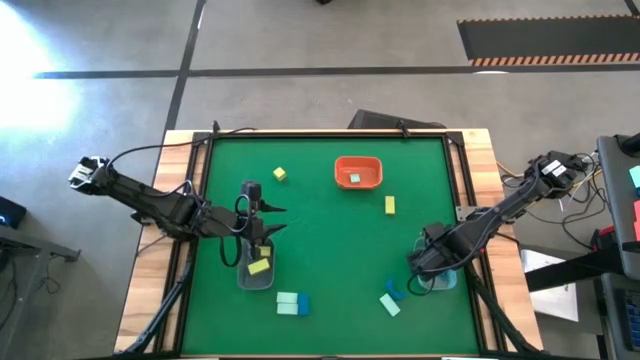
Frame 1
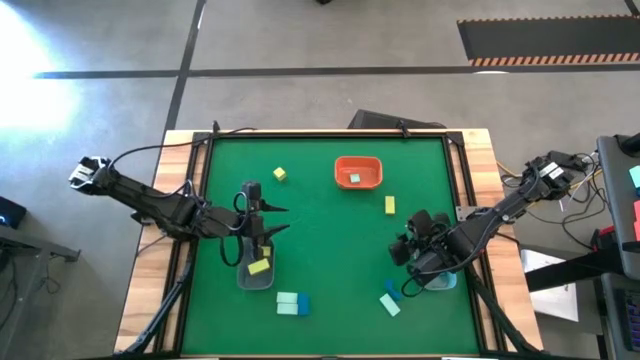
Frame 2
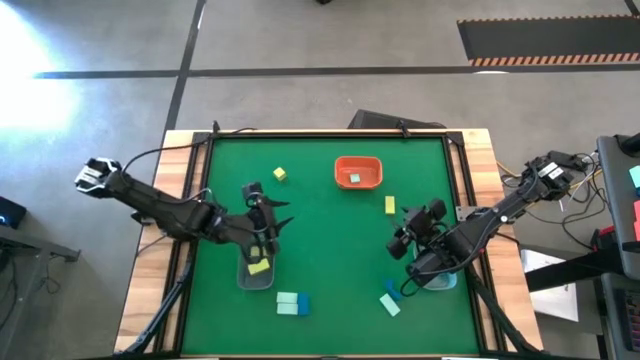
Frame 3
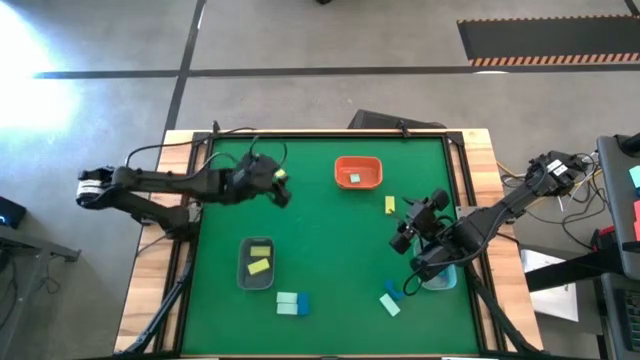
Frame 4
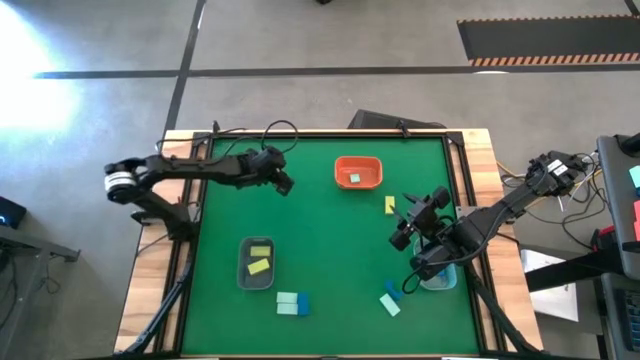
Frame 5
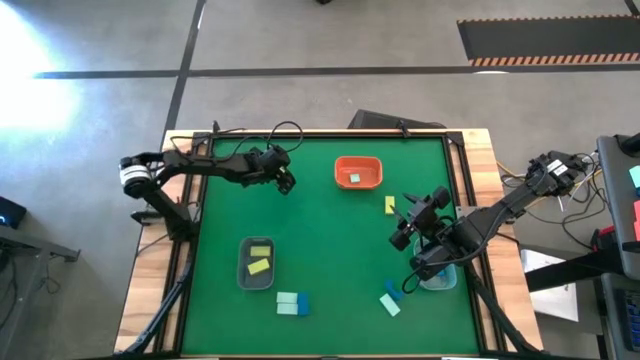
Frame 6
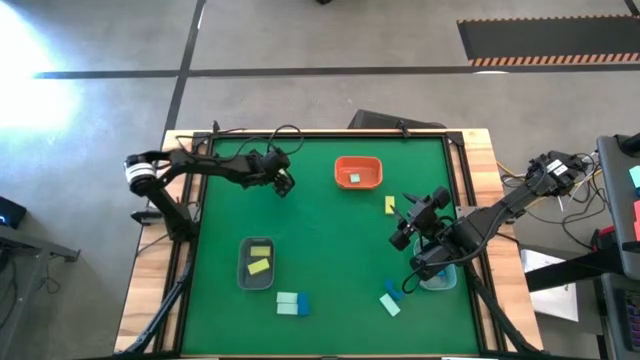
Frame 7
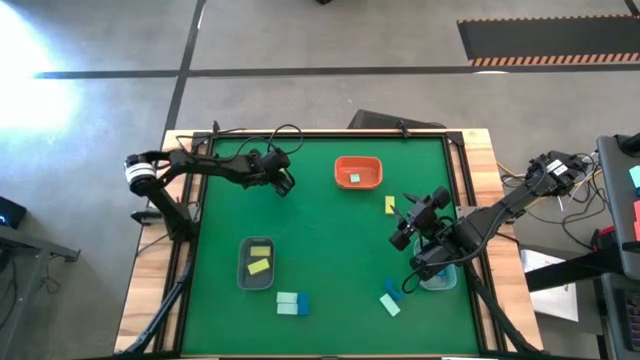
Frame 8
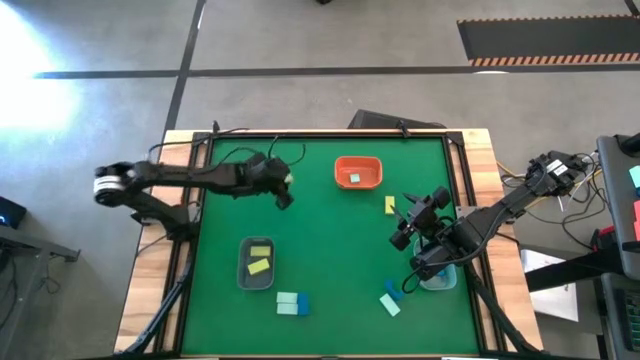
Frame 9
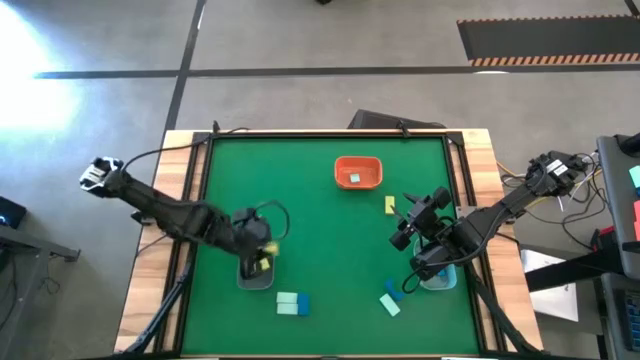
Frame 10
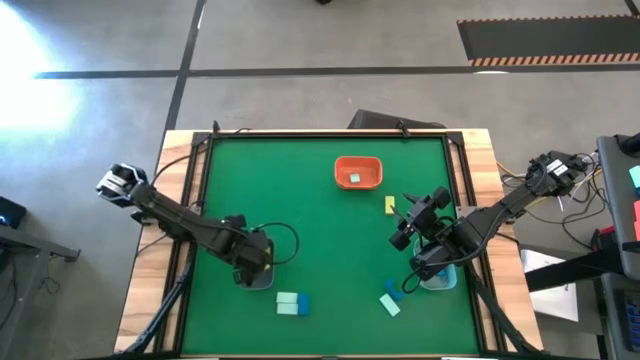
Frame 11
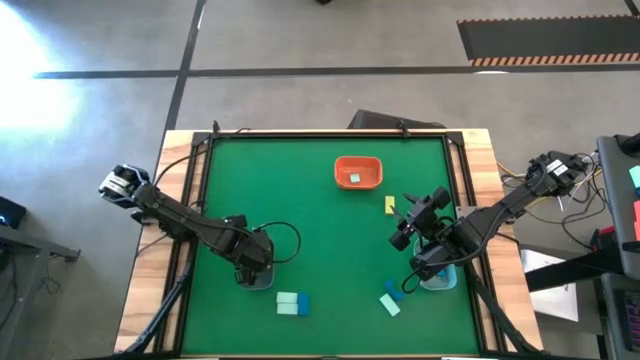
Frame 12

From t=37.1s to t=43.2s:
Task: Sort & place blocks by color
Put the light green block into the gray bin

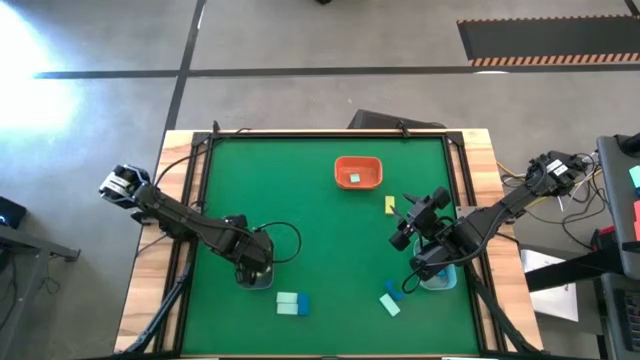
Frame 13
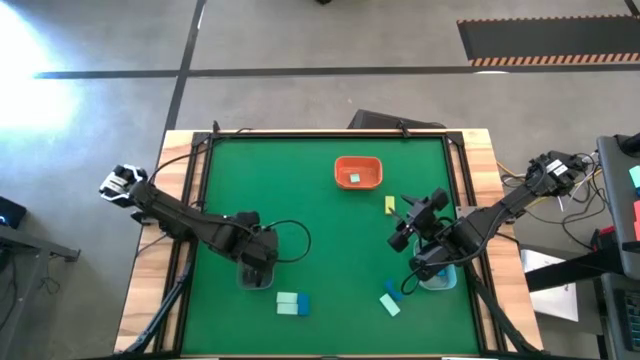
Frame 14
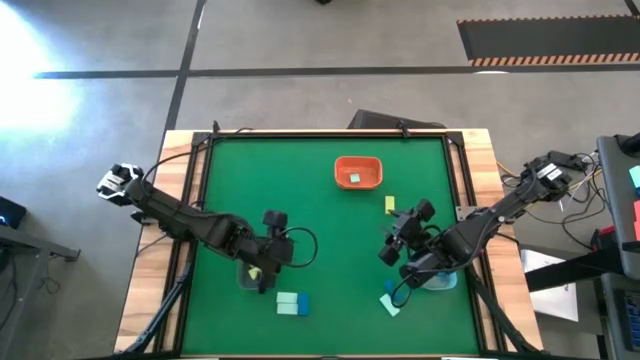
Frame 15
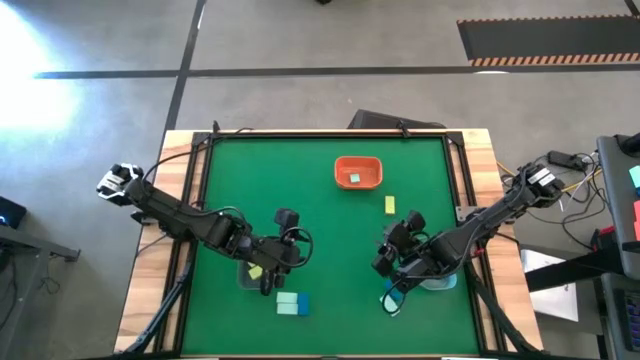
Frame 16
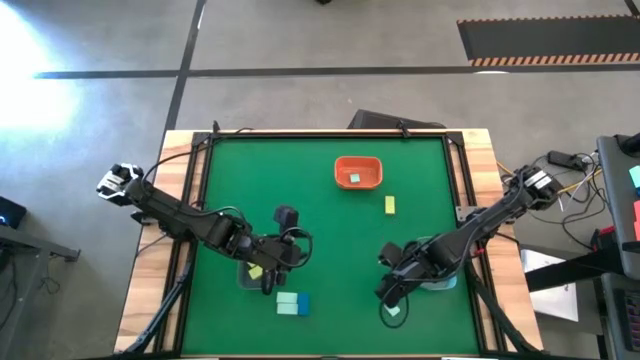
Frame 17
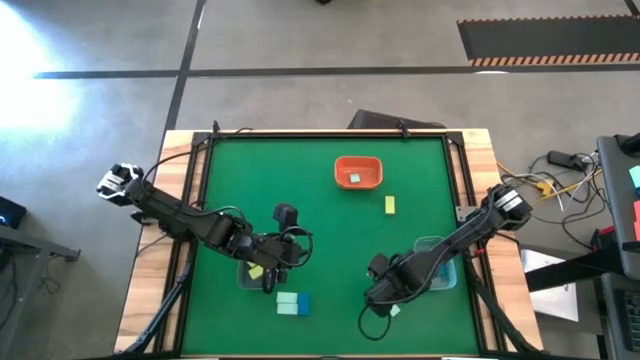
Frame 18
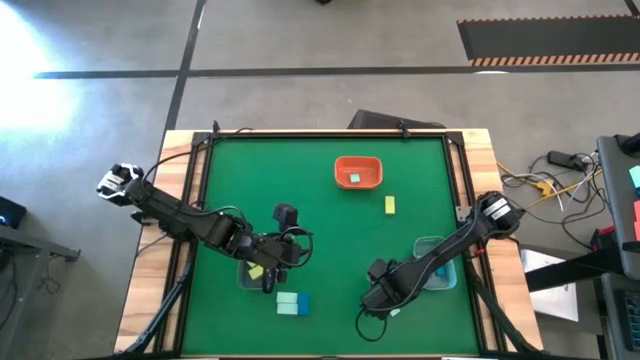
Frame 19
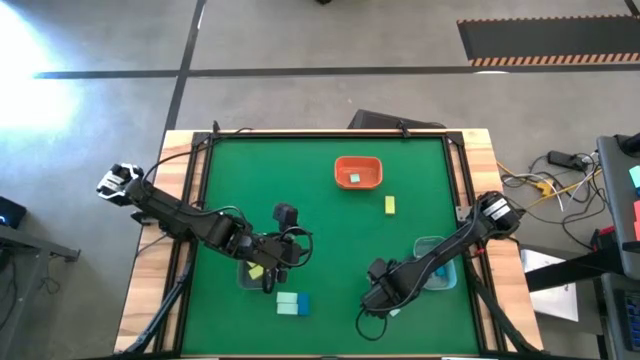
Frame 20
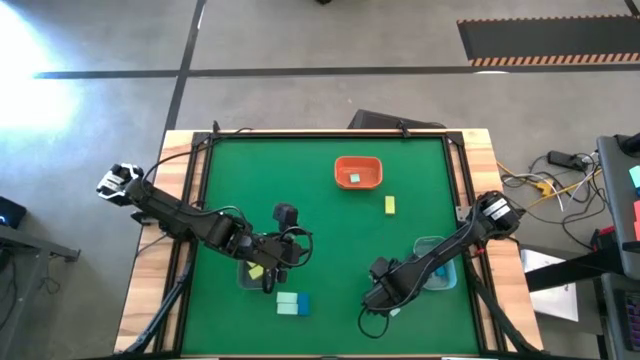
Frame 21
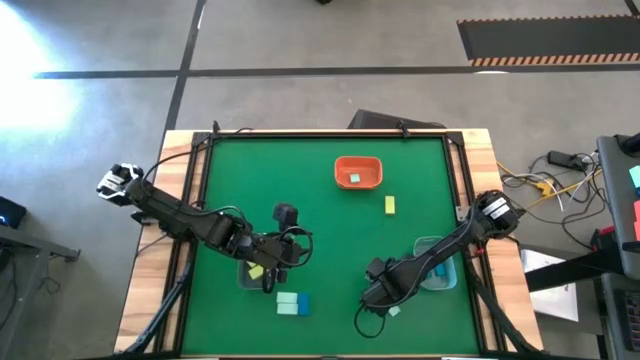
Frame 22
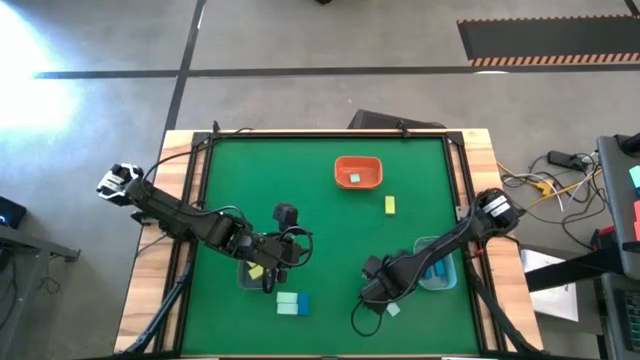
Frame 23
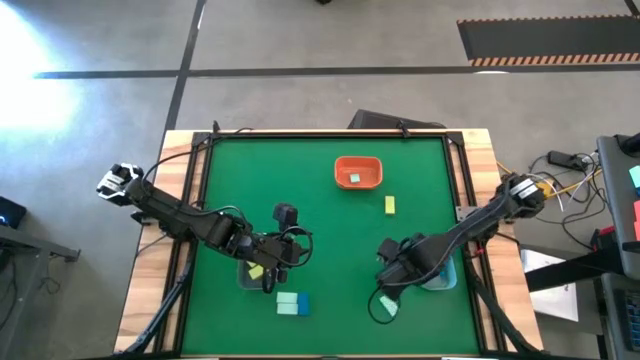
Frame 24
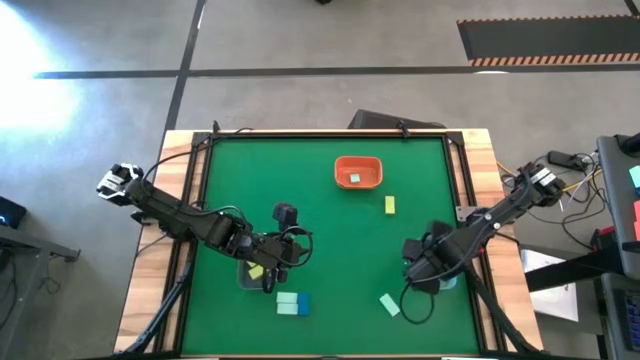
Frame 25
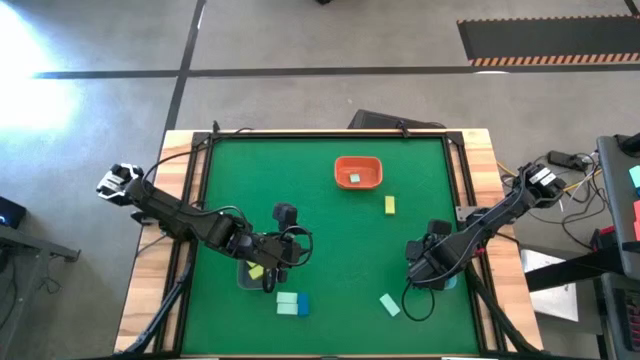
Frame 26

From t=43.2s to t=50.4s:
Put the blue block into the light blue bin

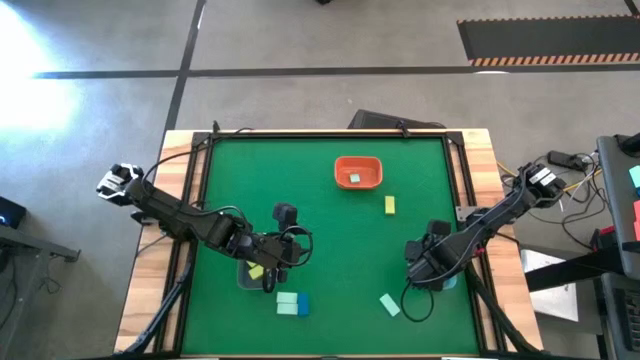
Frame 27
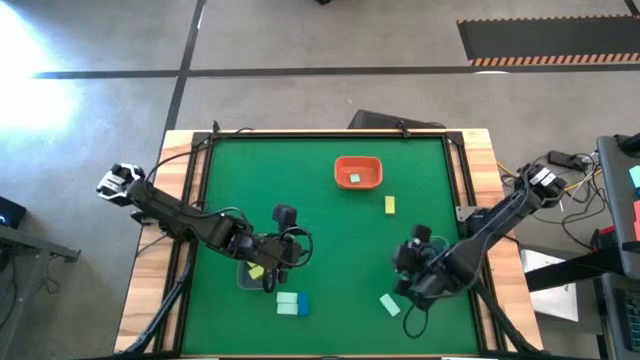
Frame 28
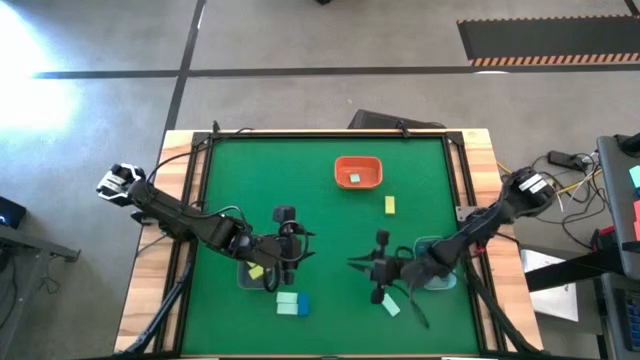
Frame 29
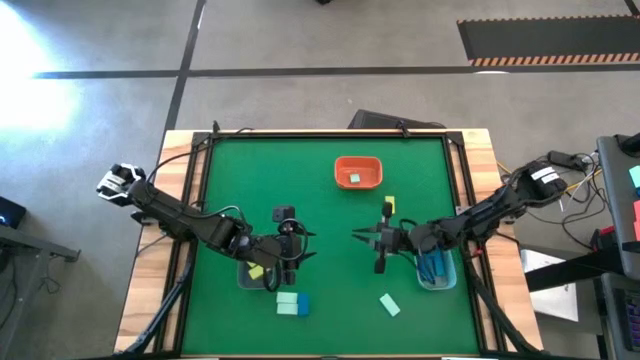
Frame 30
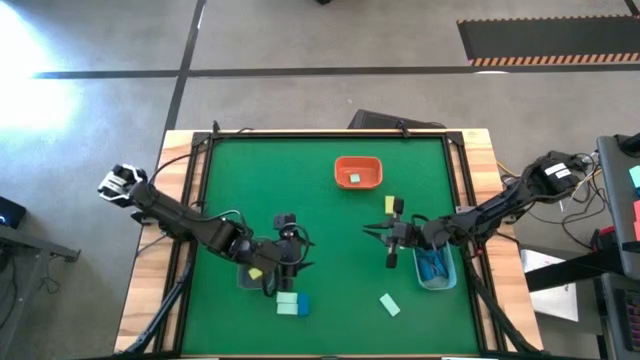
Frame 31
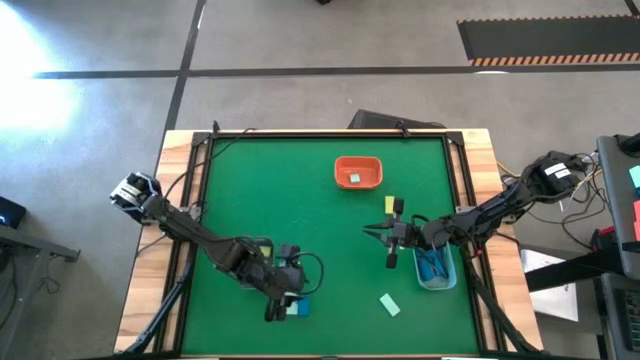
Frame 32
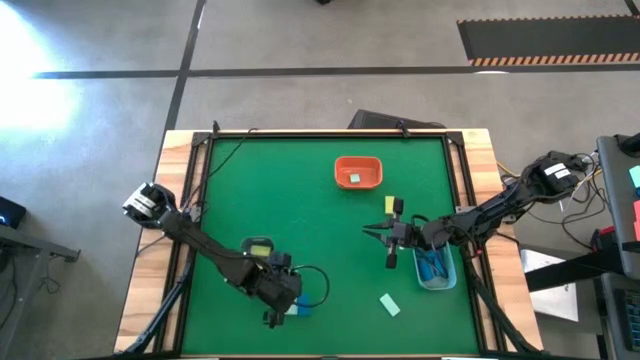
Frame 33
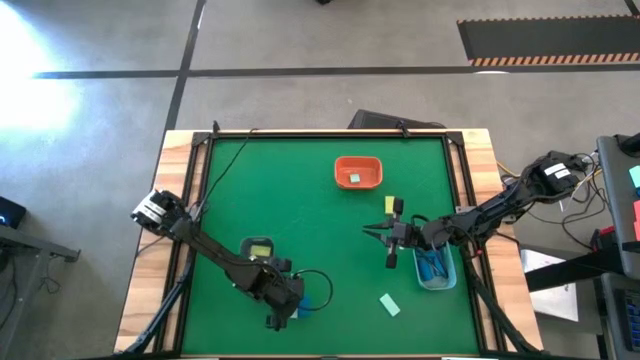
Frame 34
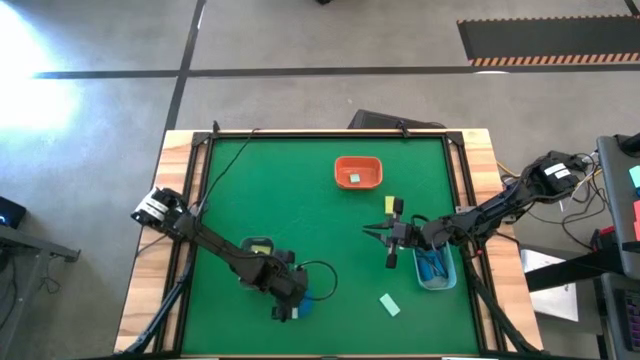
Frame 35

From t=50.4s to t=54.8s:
Put the light blue block into the orange bin

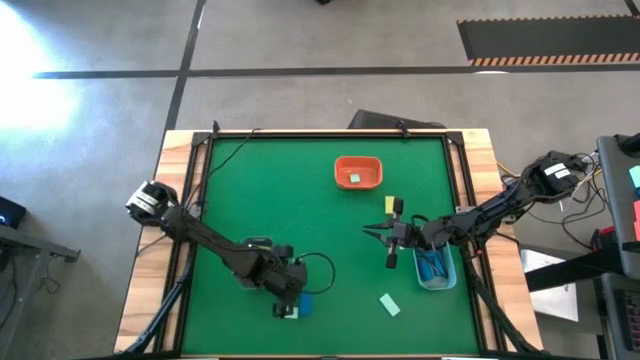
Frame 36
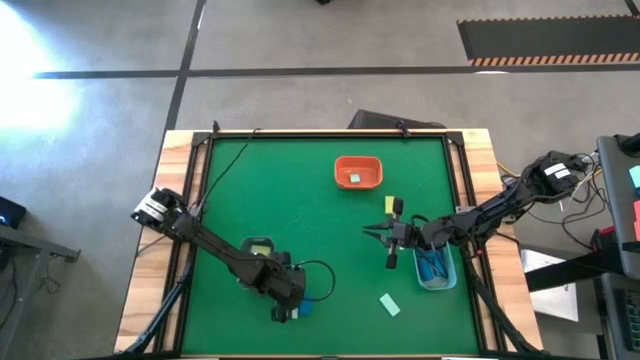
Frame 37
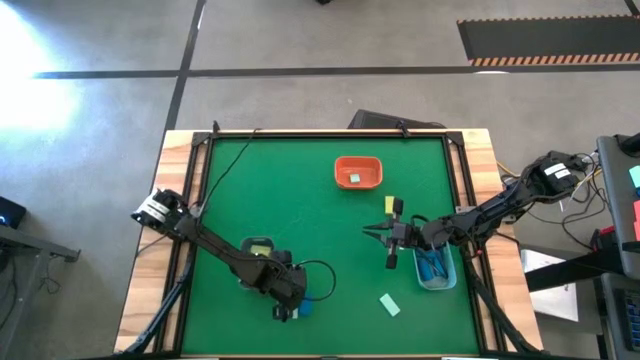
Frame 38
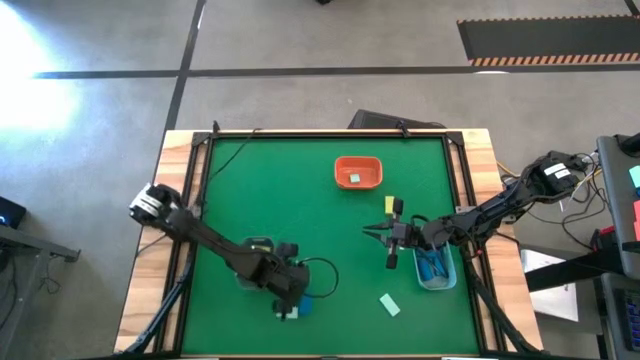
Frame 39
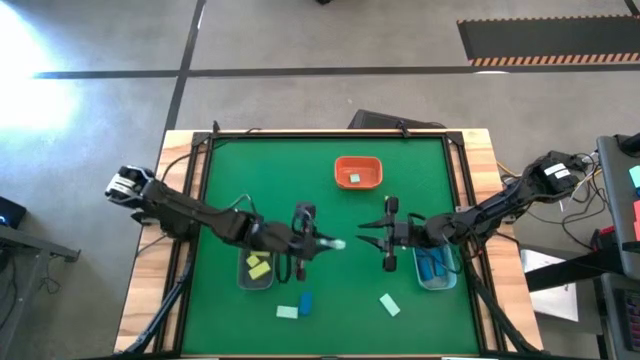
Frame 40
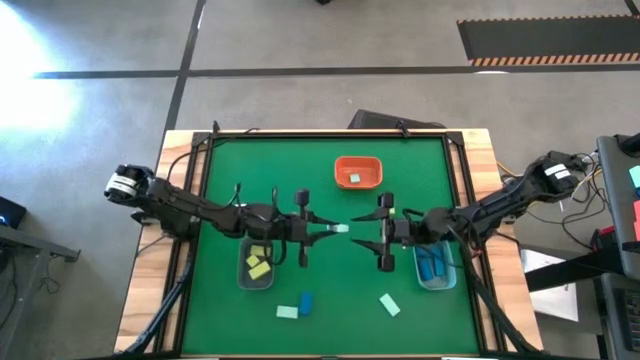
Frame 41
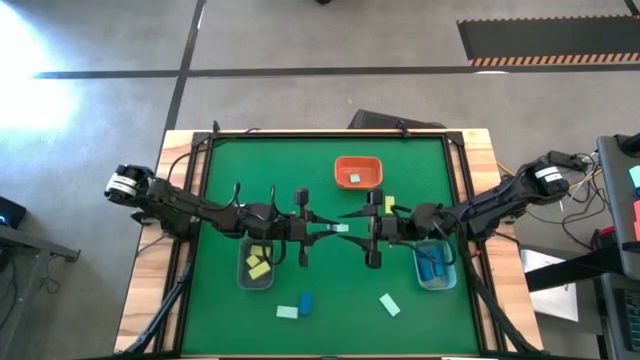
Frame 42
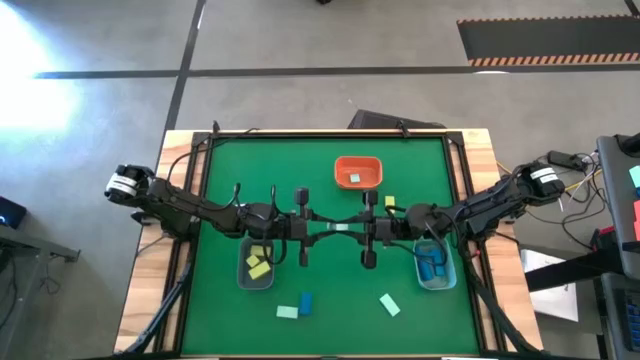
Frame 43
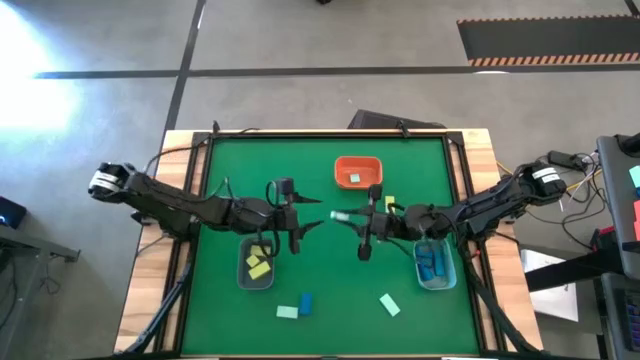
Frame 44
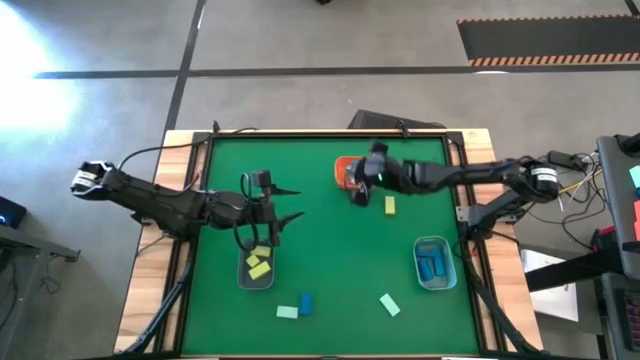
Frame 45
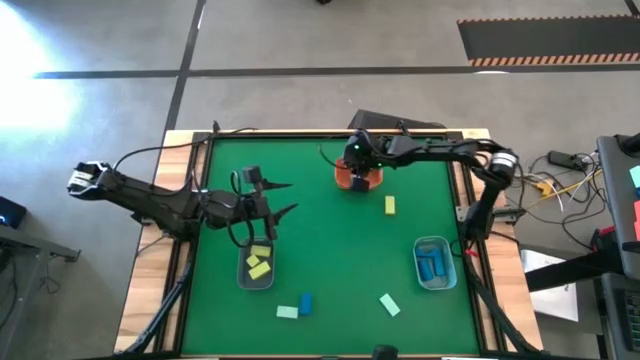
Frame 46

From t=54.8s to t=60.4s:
Put the light blue block into the orange bin
